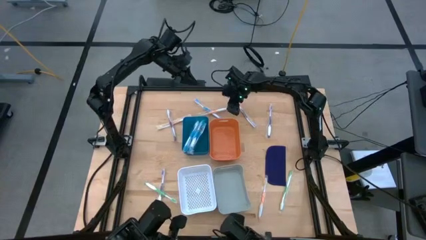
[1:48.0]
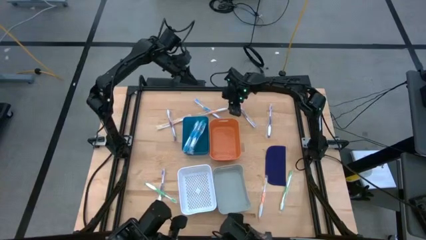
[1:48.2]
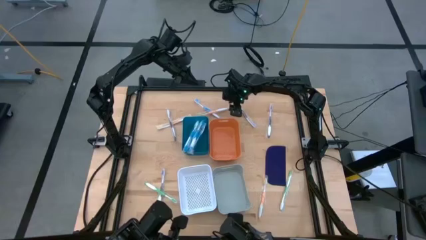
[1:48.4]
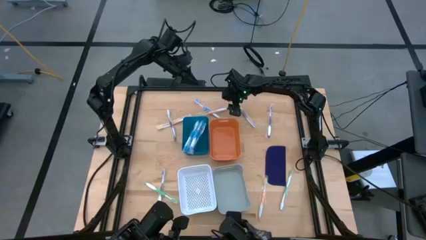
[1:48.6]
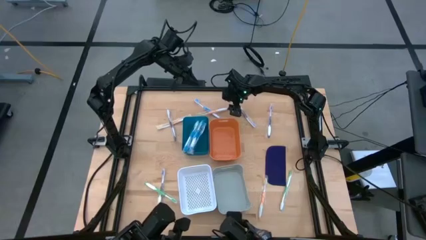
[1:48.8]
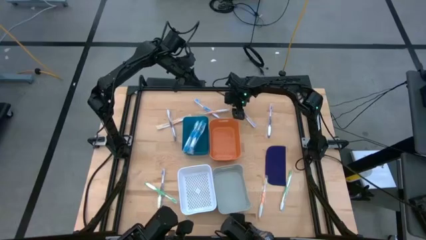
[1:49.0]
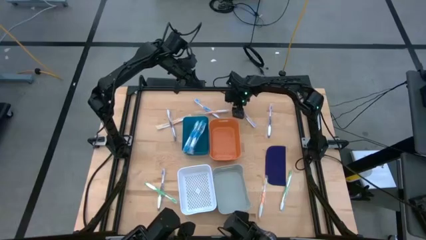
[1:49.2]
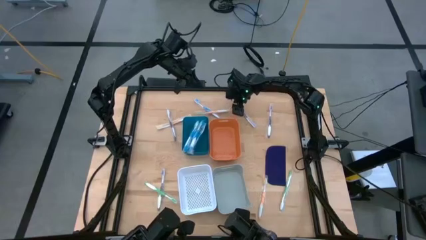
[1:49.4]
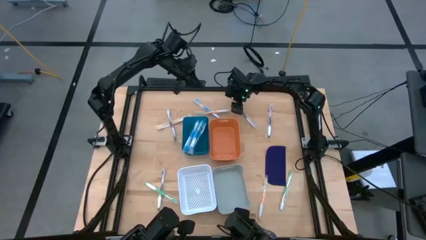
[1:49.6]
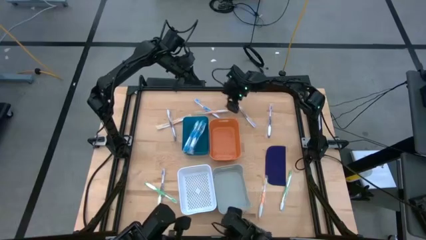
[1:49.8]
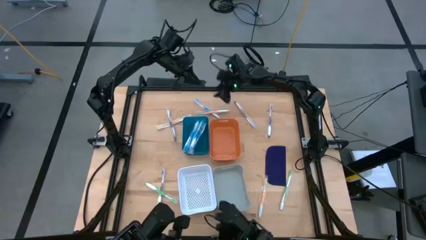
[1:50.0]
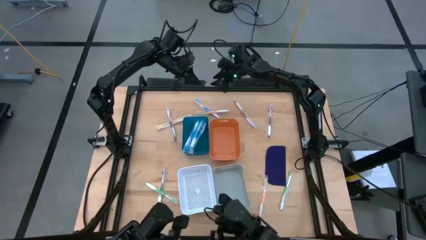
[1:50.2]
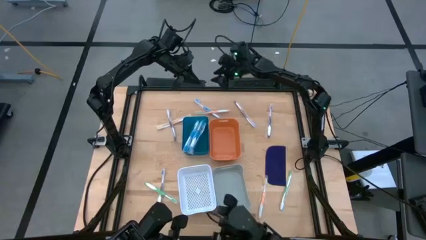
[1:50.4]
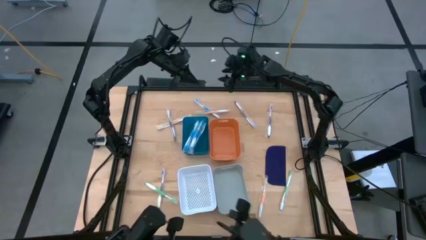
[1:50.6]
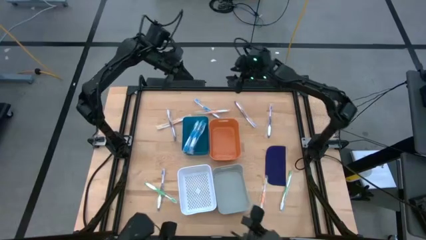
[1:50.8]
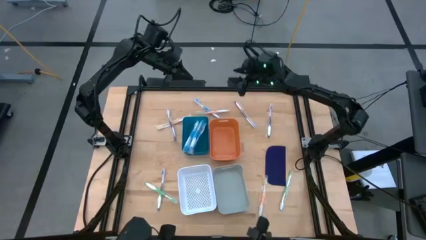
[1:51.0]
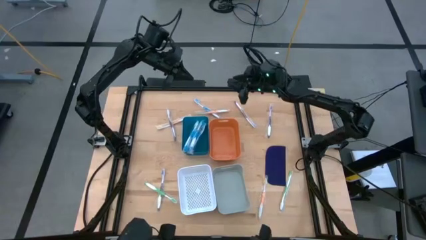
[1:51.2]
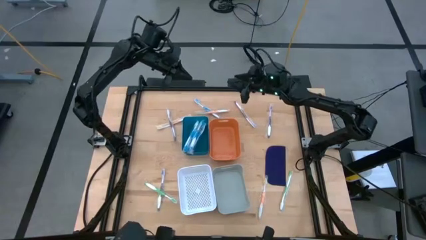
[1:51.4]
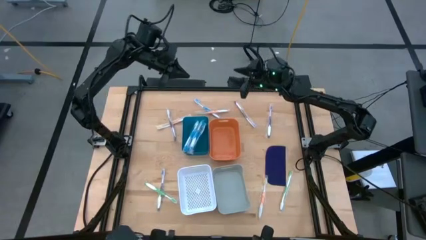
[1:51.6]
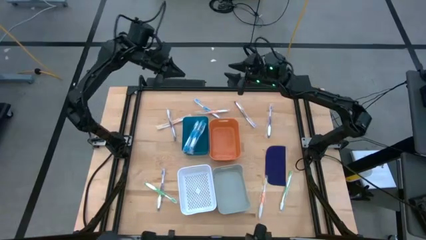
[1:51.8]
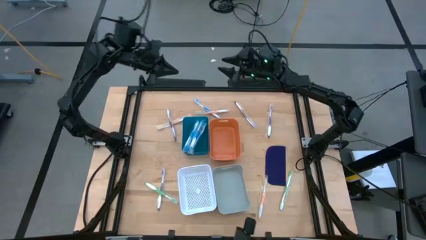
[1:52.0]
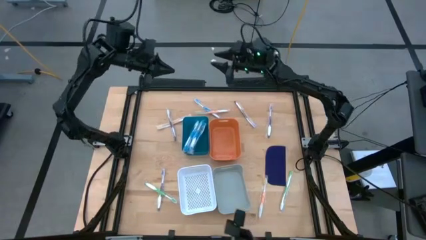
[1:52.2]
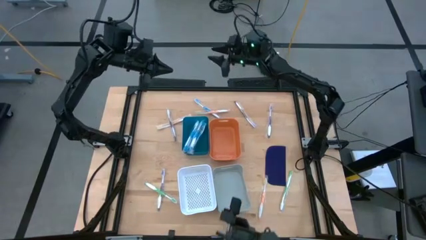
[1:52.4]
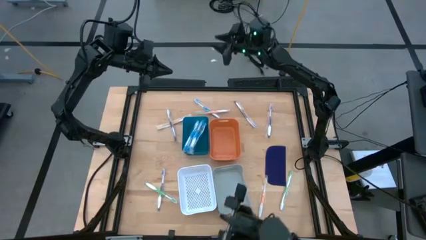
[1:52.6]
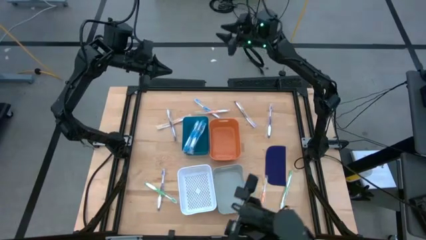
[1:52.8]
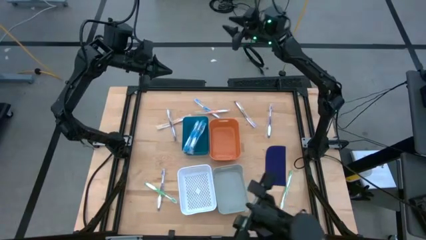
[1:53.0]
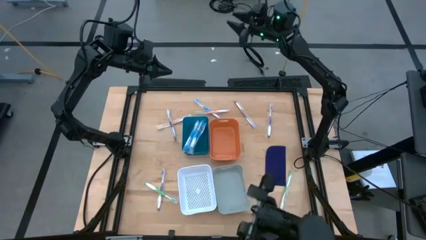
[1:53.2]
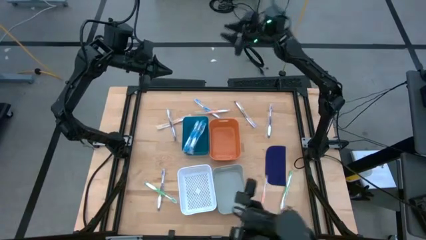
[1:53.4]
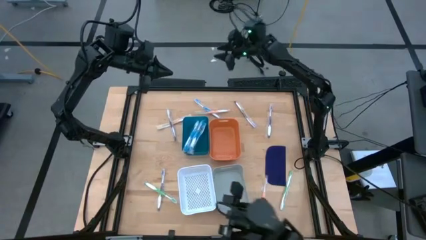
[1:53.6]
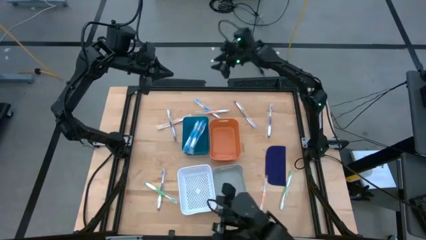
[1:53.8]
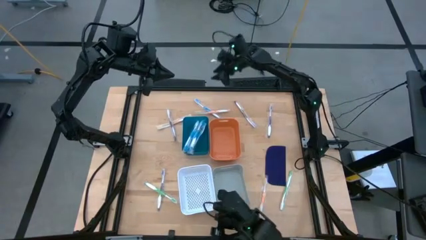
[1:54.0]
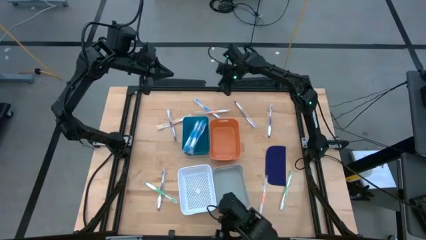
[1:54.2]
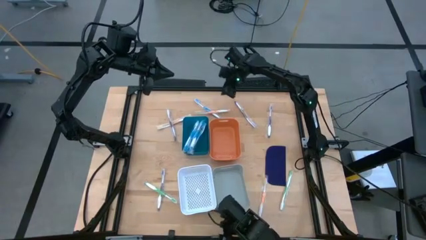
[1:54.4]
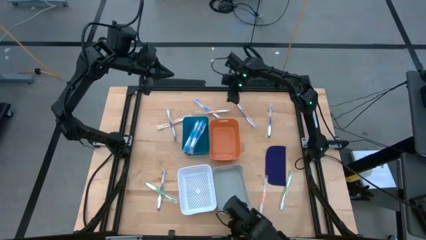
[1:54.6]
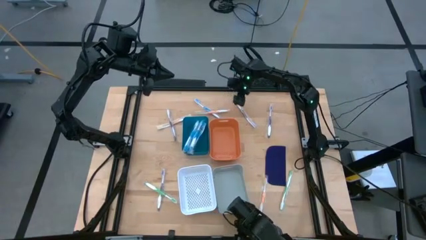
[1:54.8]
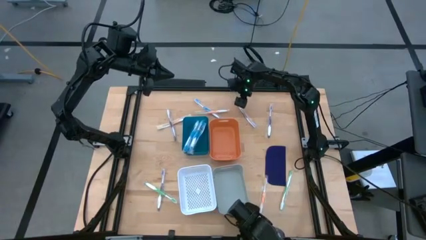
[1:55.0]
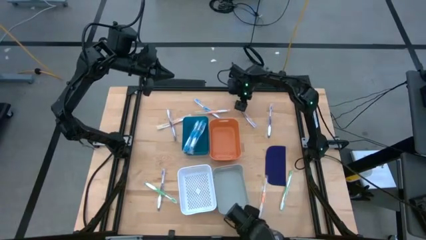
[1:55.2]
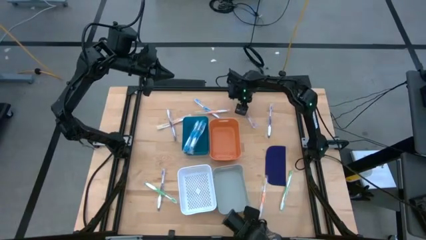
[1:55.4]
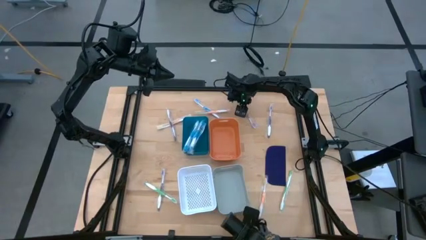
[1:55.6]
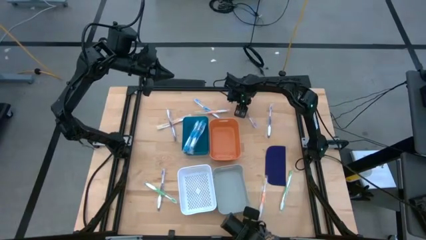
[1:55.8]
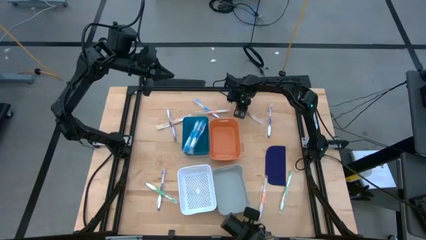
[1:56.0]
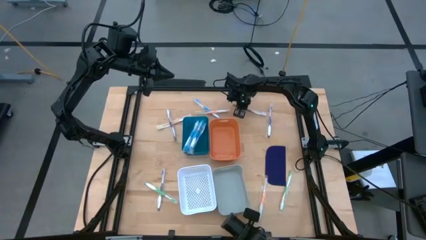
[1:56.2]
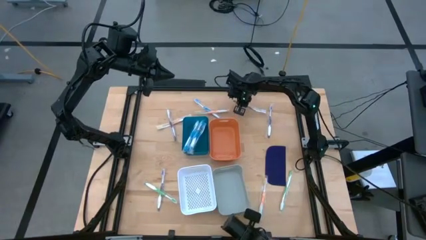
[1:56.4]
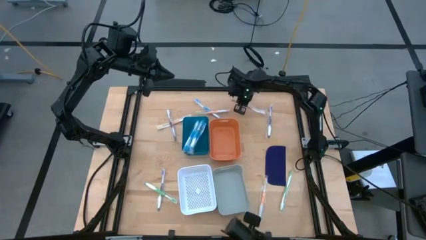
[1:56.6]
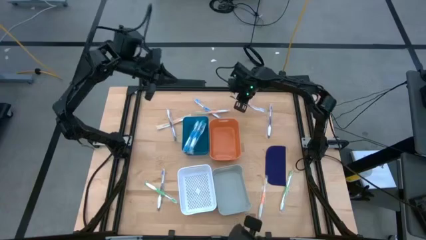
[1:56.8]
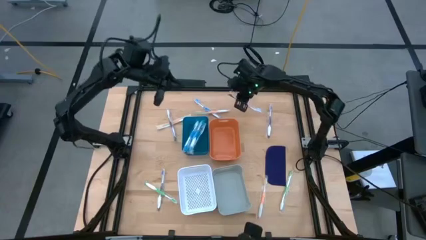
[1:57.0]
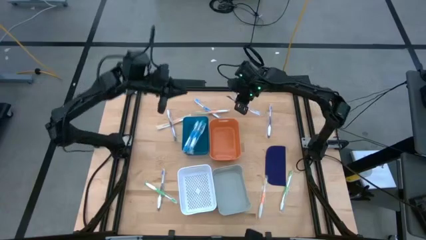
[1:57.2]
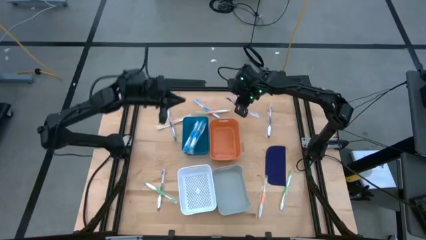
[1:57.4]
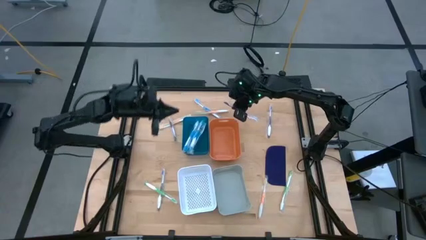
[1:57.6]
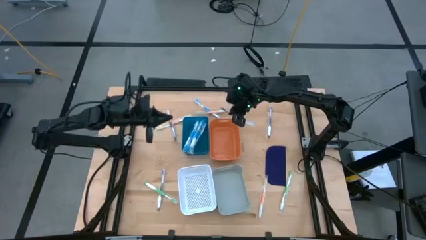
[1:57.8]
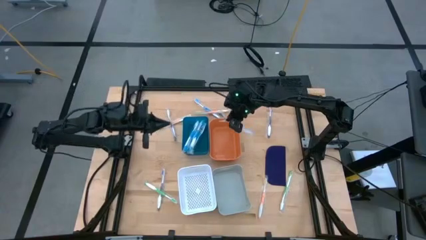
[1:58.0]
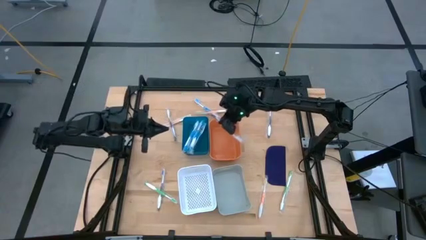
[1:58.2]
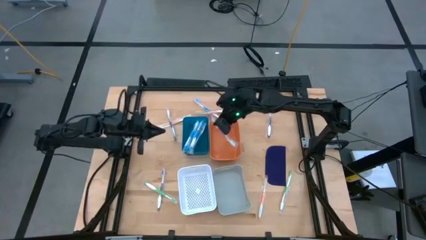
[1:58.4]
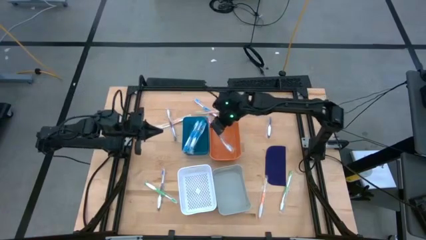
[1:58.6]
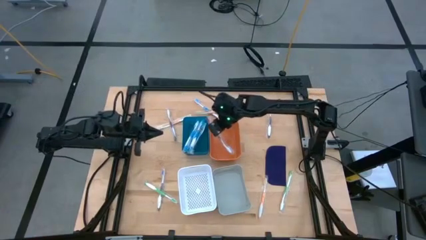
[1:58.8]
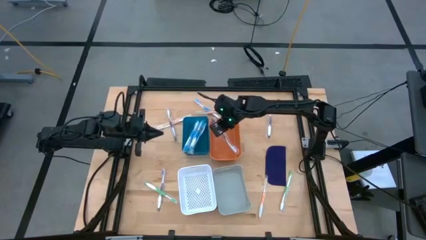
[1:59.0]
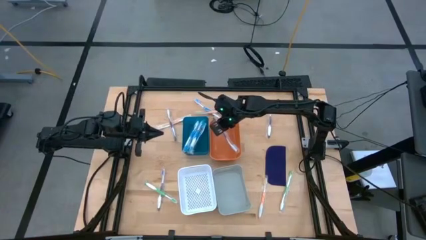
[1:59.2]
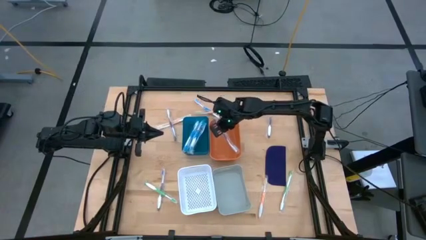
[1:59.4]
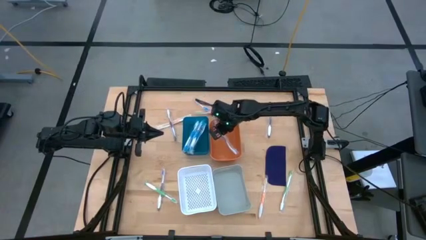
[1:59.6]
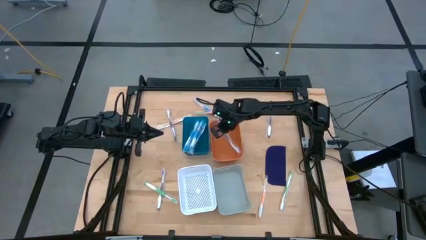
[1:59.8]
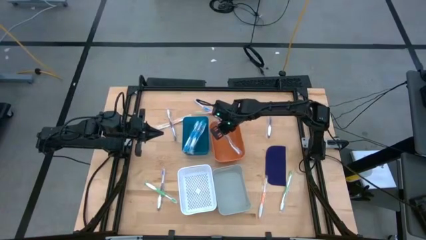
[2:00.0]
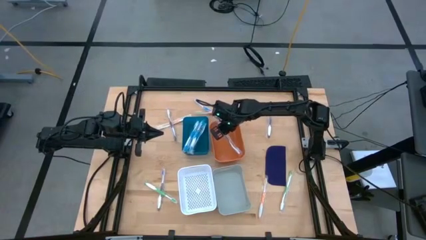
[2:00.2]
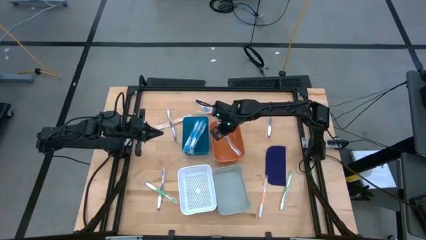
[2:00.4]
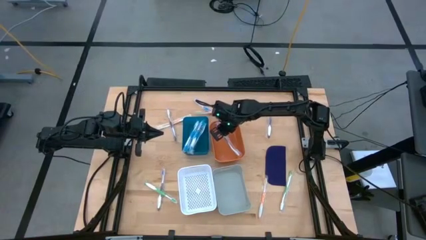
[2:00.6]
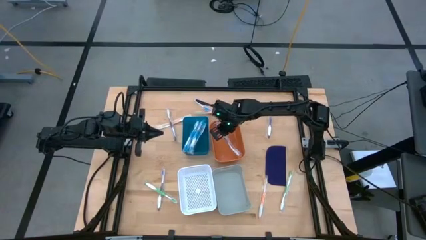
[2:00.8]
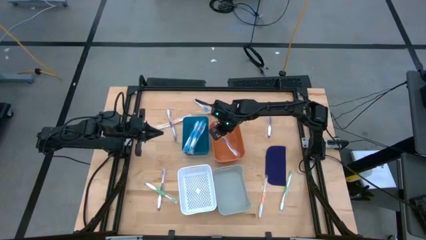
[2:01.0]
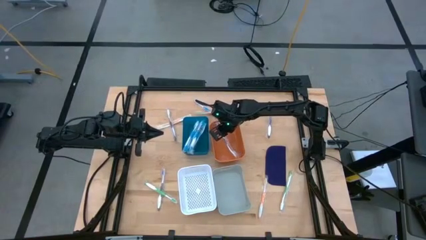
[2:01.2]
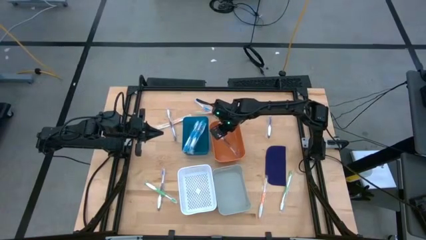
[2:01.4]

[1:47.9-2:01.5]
Task: Pick & Place Toothbrushes
Put the violet toothbrush into the orange bin

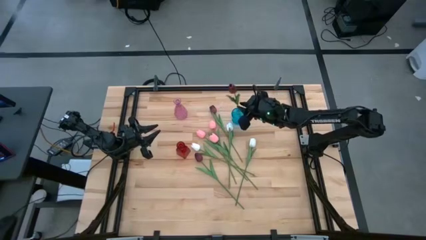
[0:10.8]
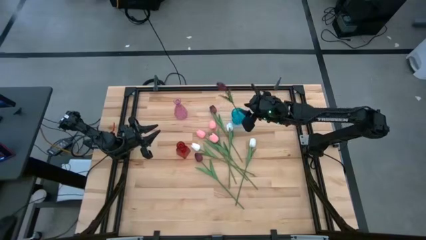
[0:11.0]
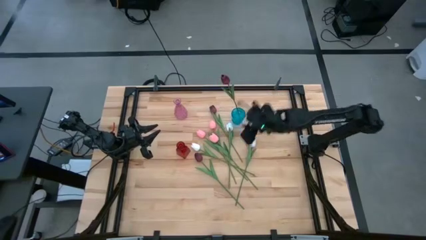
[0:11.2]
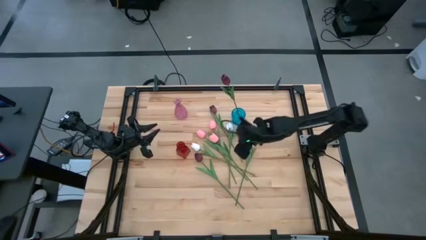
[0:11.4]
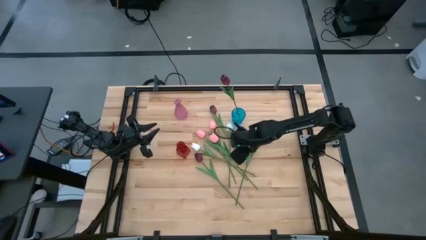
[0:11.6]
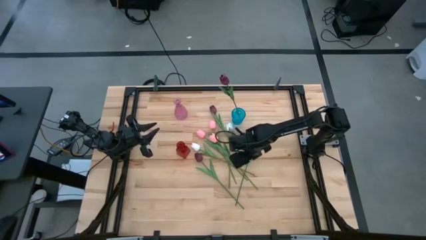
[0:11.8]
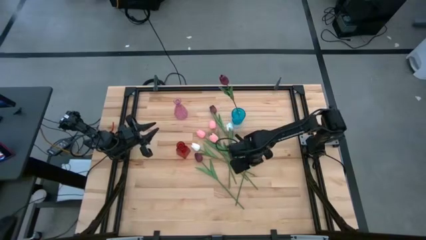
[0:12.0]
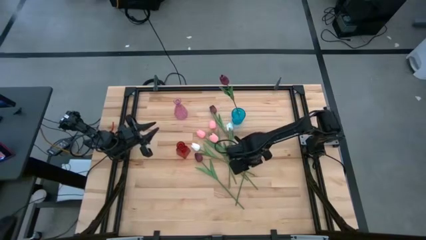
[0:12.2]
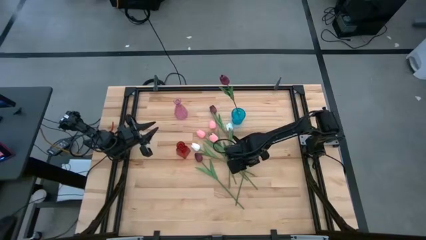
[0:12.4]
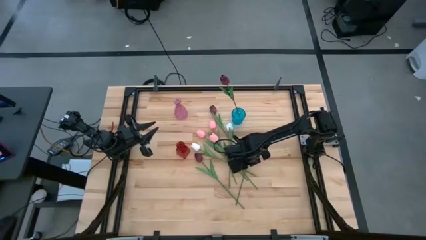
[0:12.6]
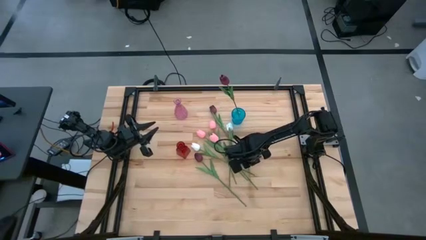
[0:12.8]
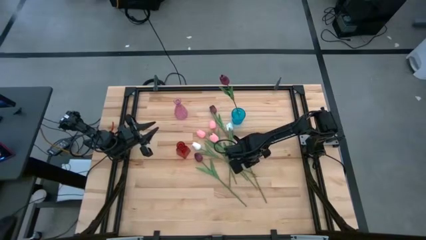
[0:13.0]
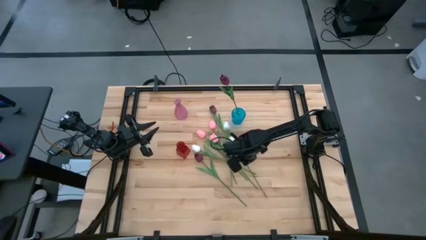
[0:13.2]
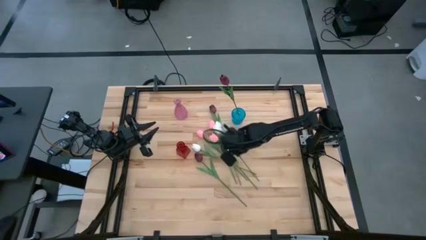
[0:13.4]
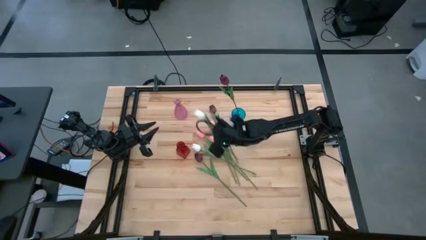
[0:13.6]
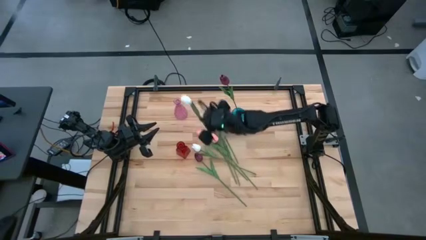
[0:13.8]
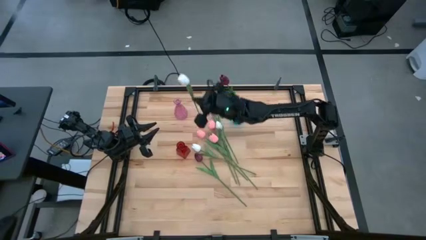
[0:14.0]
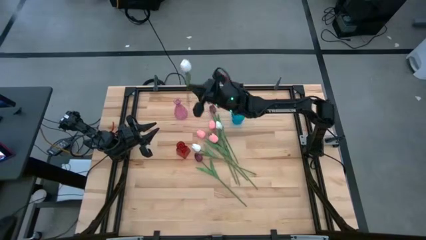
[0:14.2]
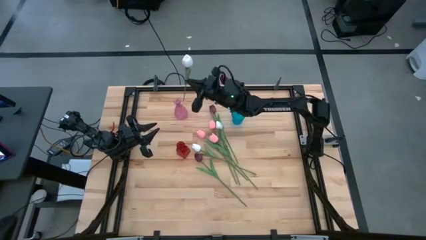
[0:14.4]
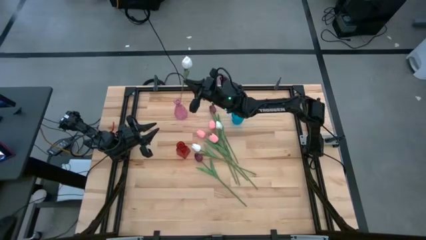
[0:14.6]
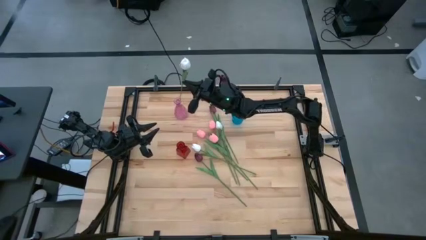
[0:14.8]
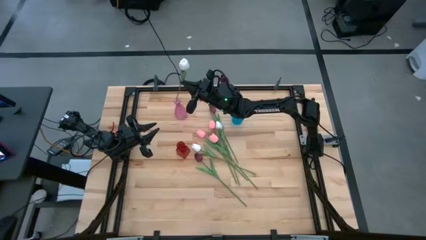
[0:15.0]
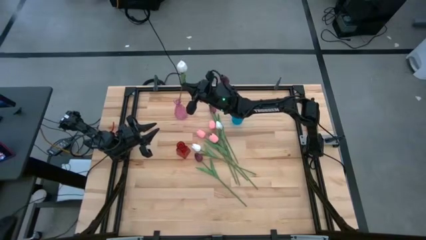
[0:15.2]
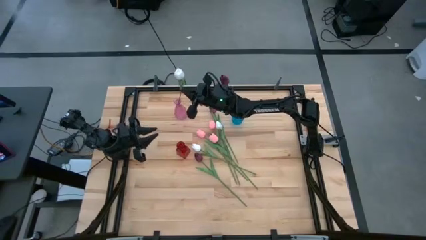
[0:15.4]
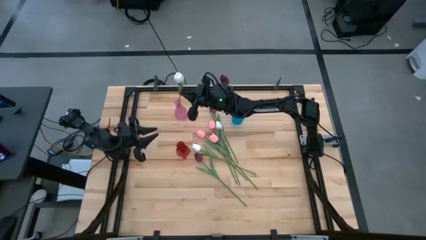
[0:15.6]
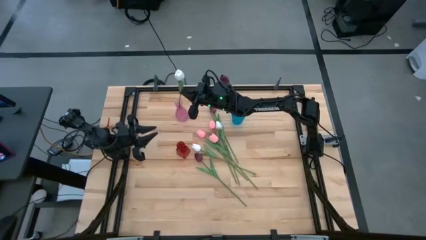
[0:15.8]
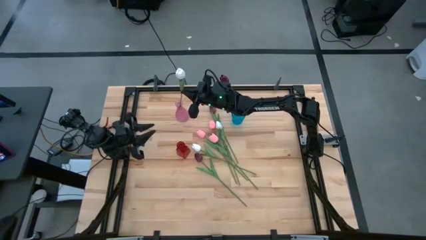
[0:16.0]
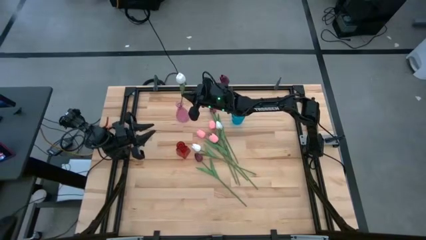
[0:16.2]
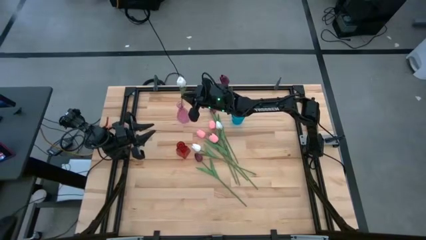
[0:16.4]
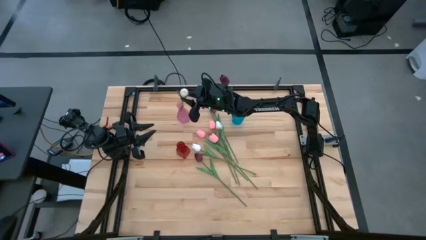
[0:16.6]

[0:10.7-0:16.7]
Task: Sort flowers into vase by color
Put the right white flower into the pink vase
